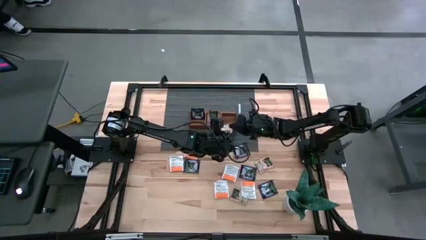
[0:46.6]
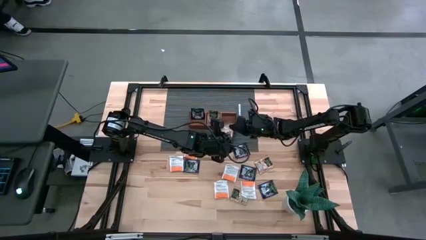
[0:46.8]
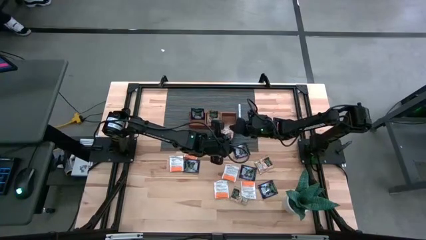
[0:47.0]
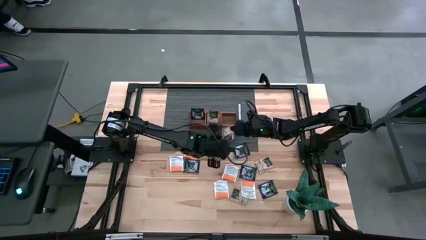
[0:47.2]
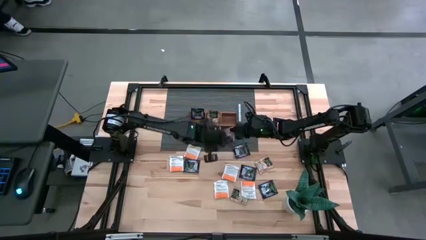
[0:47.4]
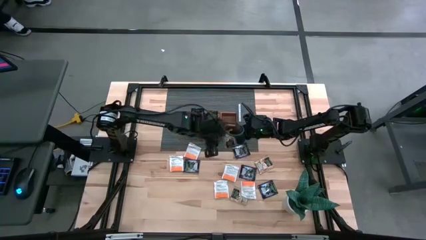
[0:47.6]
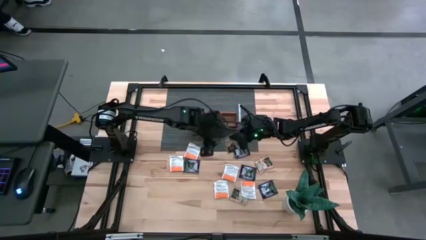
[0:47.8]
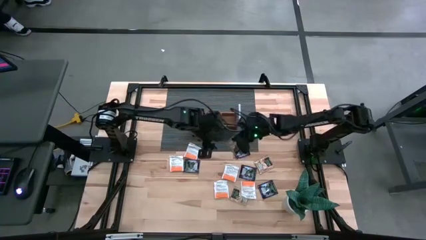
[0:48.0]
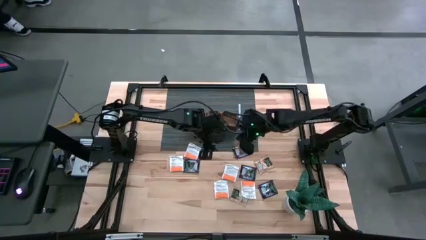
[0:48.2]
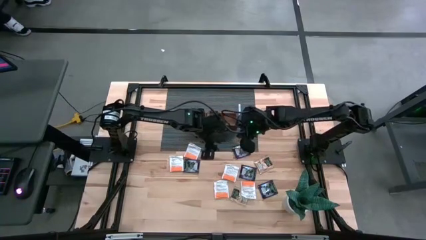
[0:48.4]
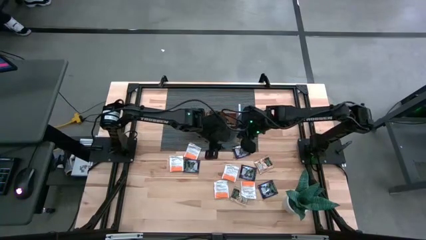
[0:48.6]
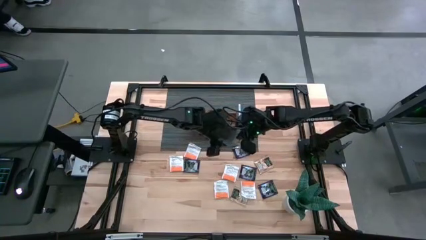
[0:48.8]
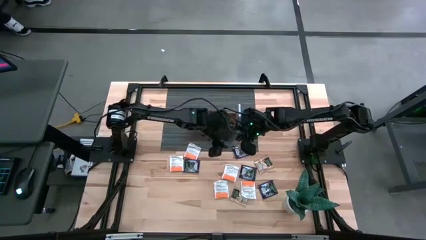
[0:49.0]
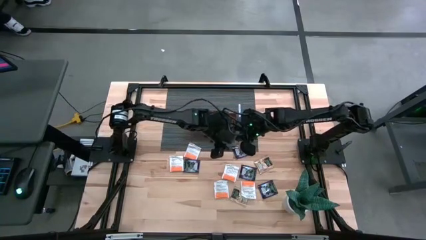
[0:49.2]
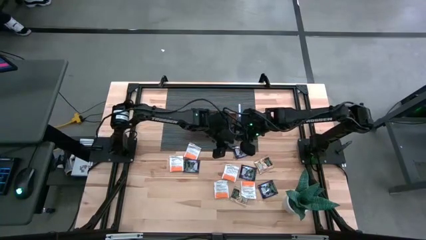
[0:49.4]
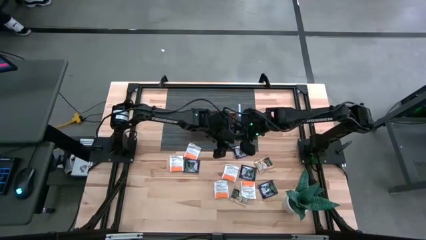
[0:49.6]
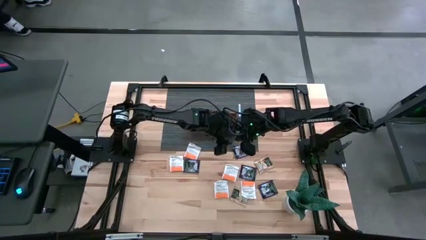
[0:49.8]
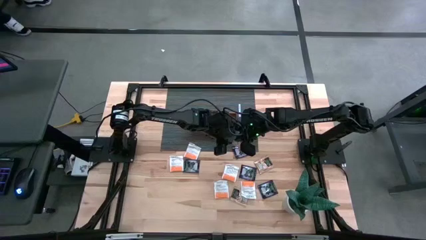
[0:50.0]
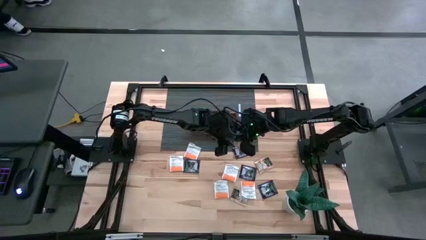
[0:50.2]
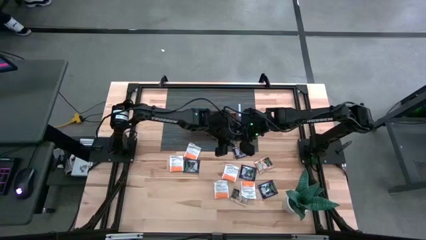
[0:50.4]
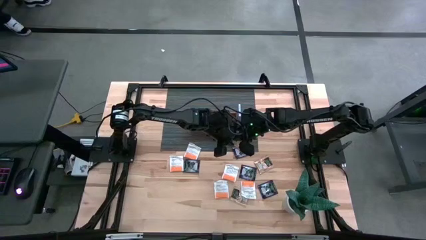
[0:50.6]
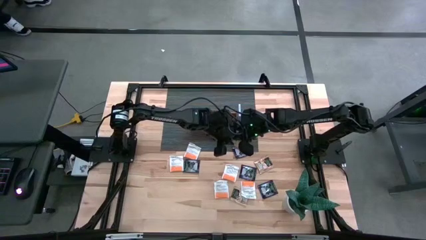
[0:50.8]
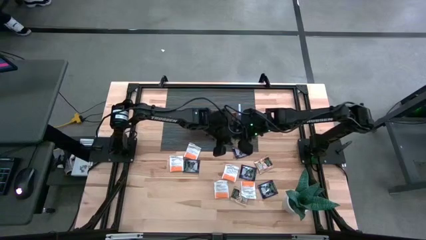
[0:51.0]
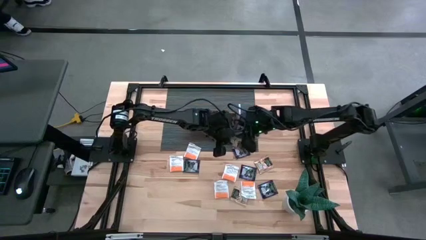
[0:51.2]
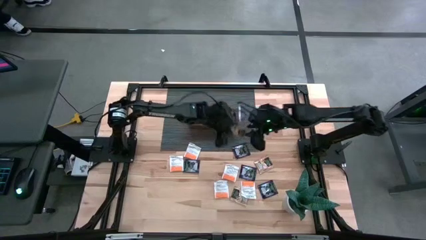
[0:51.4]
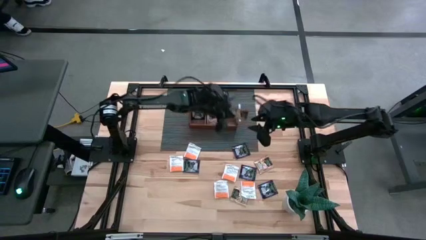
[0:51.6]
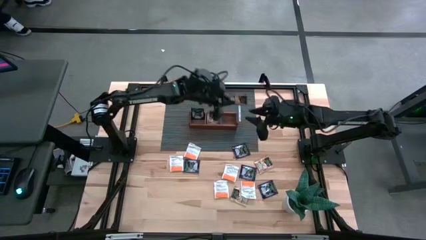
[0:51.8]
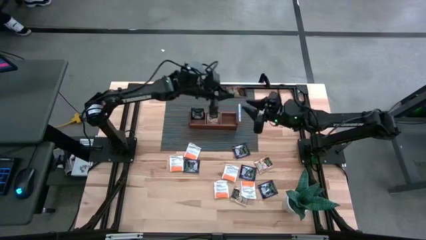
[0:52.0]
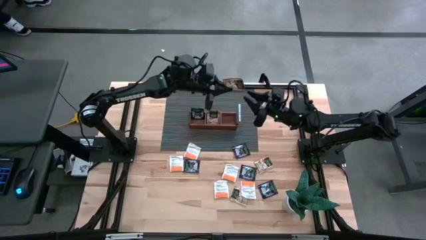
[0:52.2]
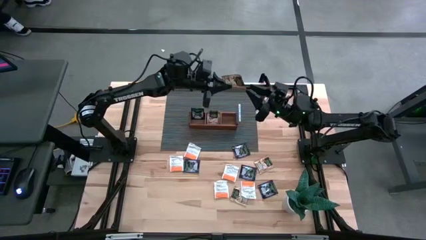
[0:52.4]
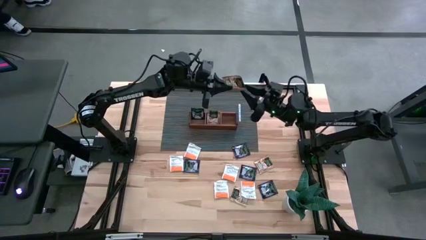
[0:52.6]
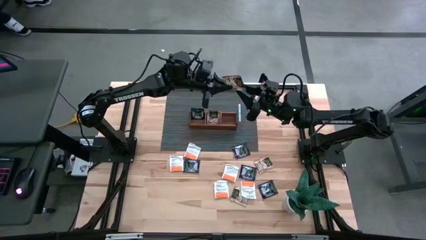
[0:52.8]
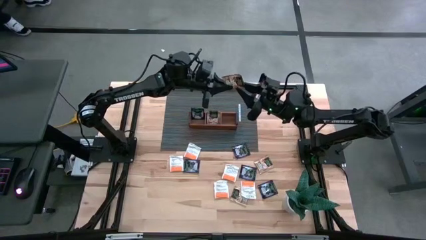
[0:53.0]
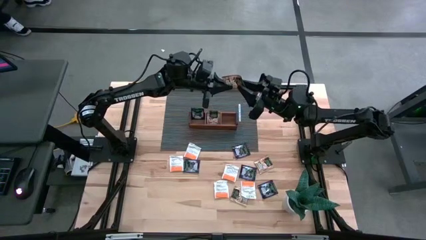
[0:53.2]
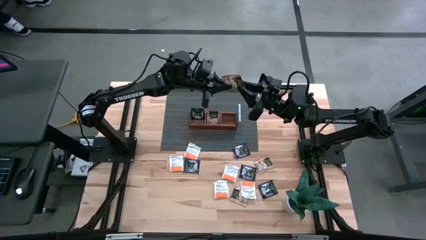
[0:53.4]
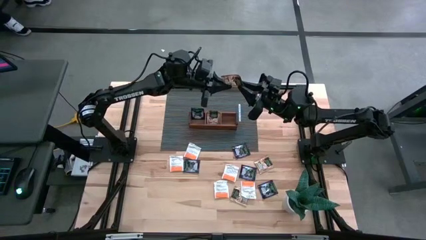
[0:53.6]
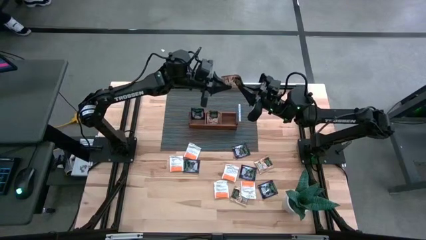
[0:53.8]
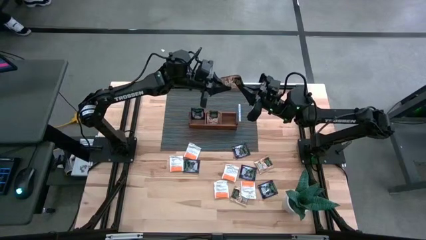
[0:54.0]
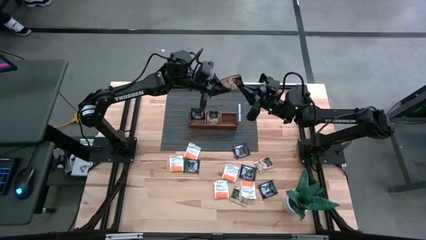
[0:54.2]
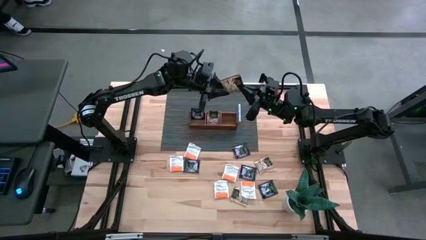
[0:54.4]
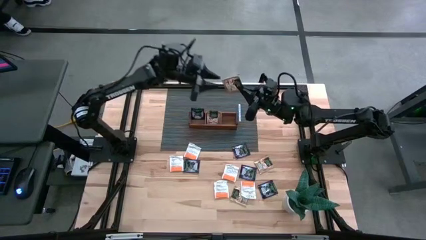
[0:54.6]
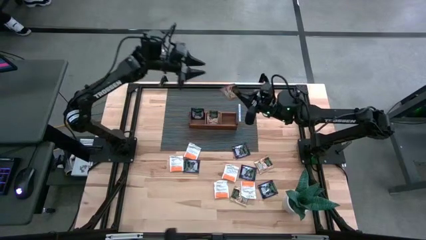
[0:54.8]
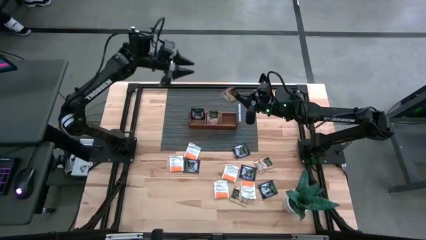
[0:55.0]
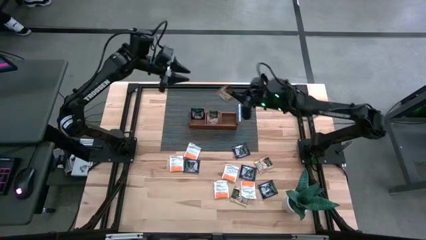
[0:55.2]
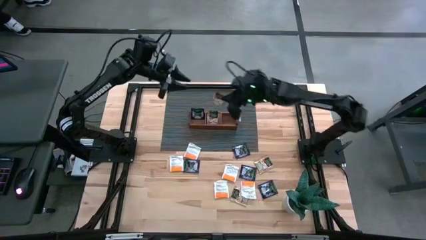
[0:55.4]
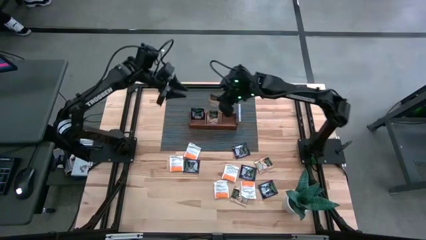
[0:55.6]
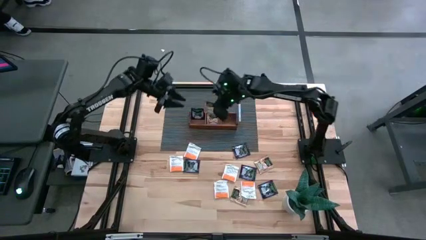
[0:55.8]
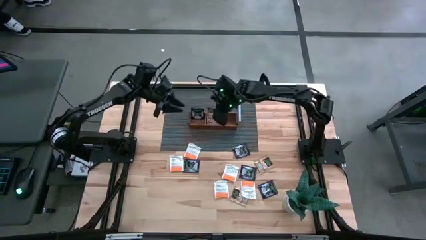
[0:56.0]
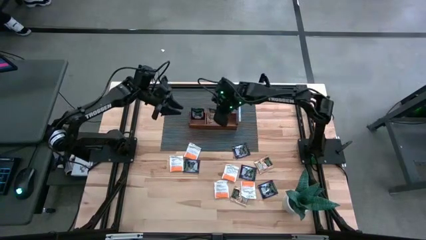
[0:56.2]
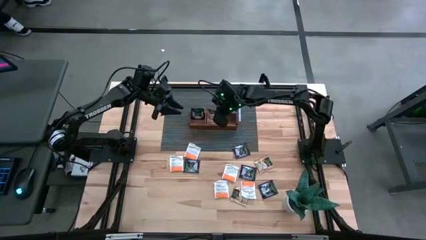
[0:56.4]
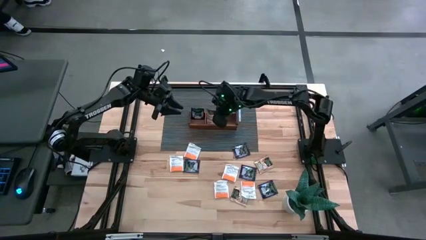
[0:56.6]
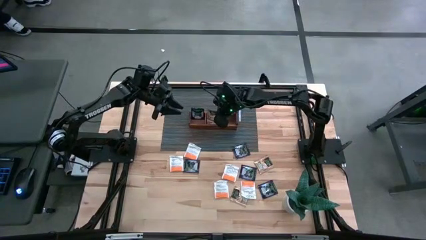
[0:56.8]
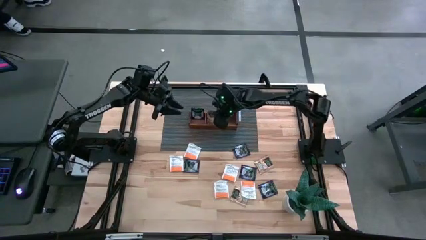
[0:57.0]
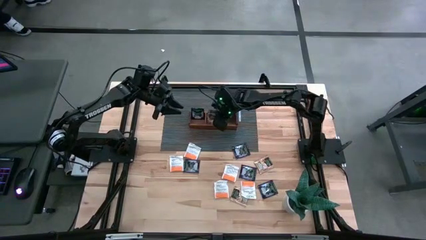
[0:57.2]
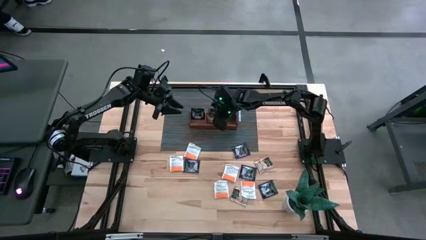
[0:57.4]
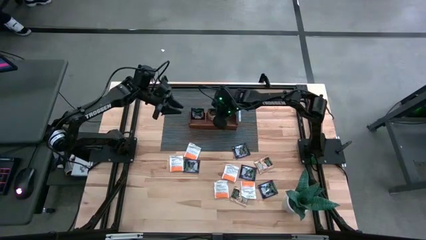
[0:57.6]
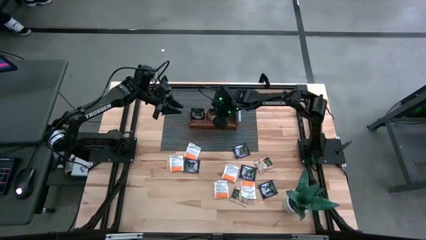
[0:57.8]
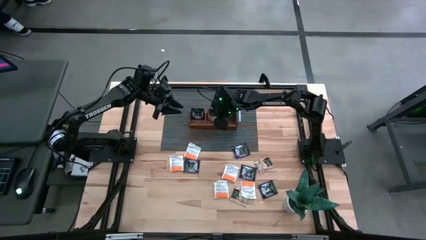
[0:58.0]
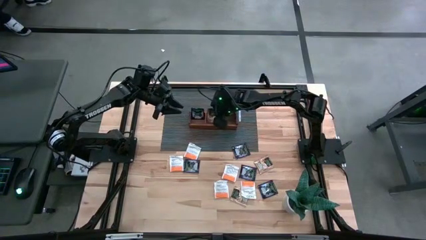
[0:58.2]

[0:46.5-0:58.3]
Task: Pick & Place Tea
Put the brown tea bag into the middle section of the wooden organizer

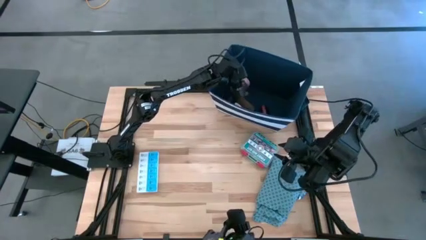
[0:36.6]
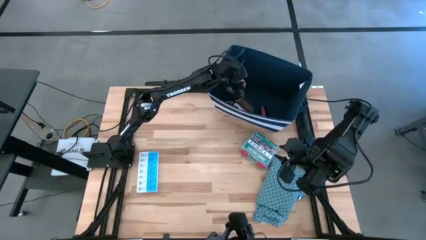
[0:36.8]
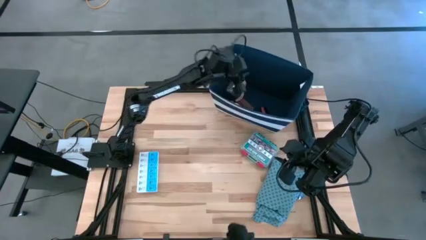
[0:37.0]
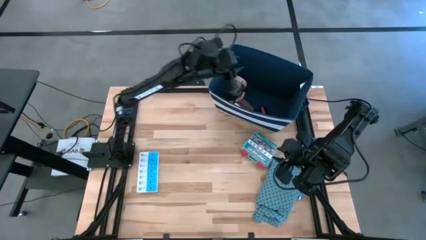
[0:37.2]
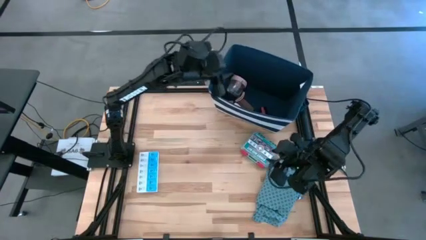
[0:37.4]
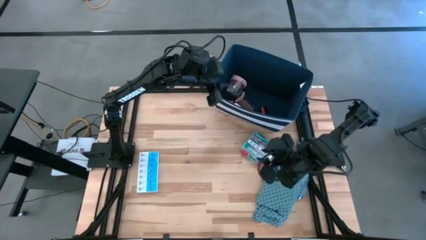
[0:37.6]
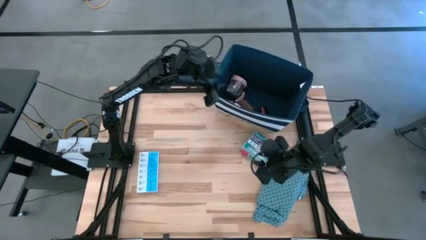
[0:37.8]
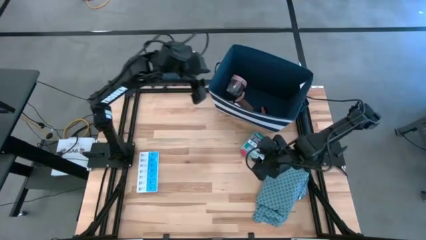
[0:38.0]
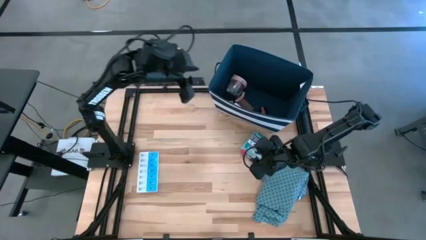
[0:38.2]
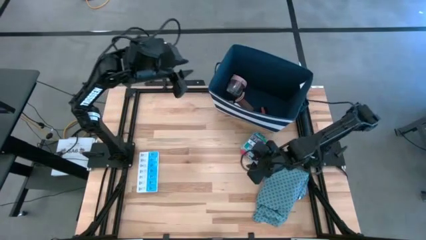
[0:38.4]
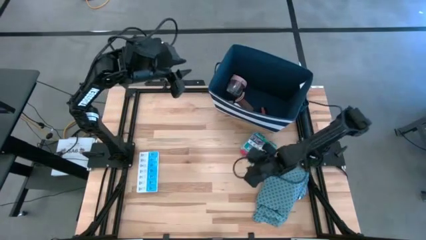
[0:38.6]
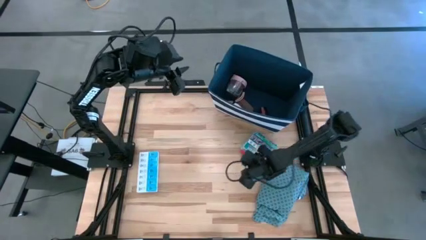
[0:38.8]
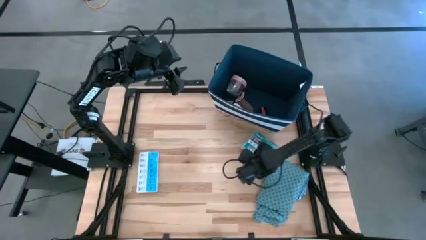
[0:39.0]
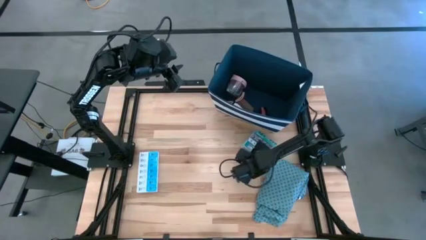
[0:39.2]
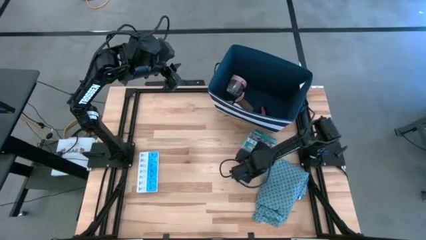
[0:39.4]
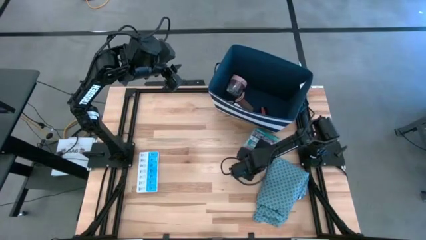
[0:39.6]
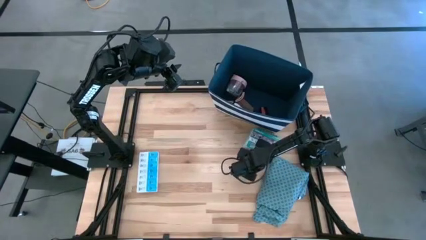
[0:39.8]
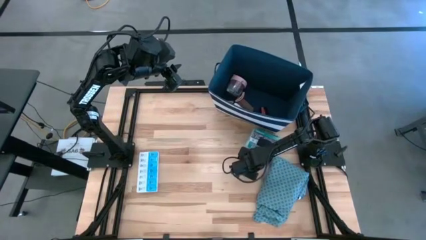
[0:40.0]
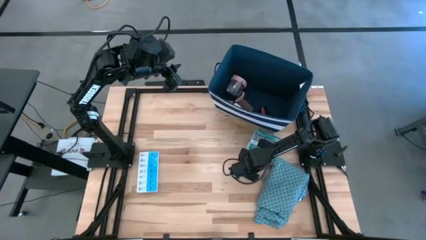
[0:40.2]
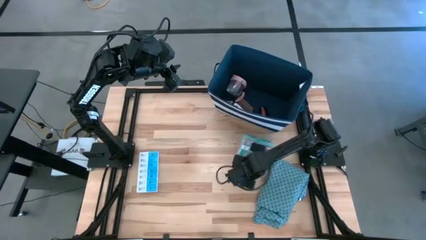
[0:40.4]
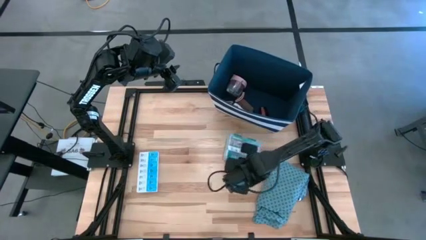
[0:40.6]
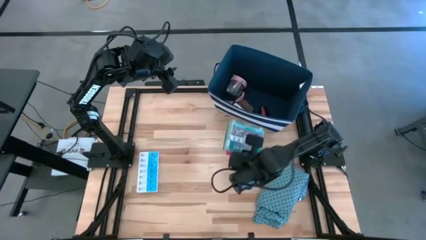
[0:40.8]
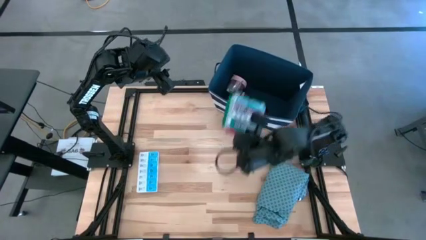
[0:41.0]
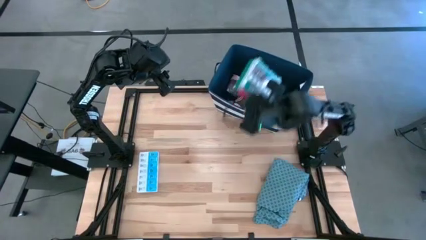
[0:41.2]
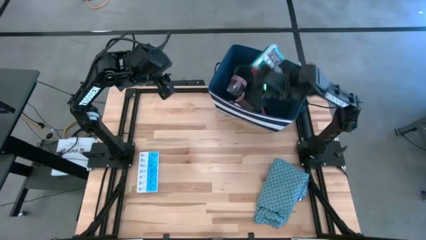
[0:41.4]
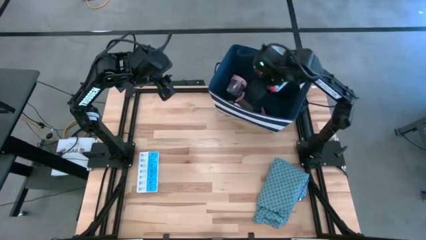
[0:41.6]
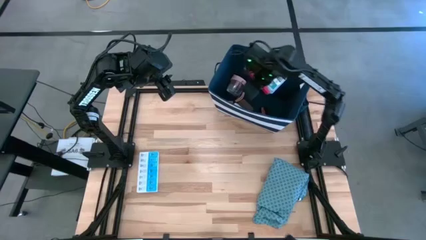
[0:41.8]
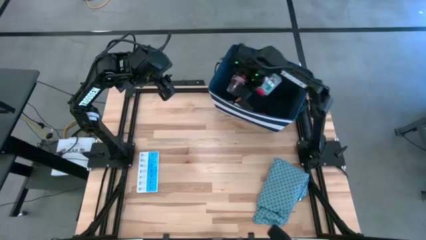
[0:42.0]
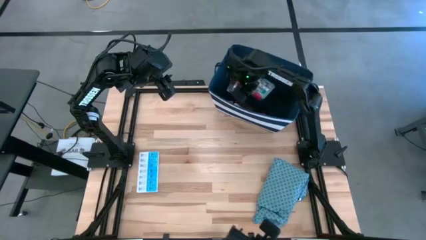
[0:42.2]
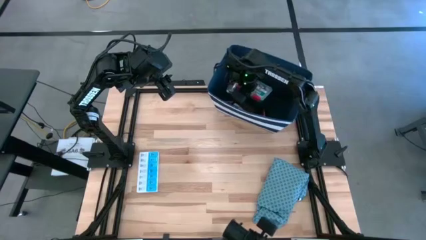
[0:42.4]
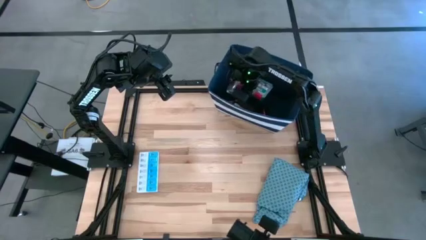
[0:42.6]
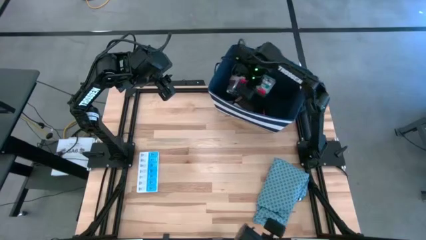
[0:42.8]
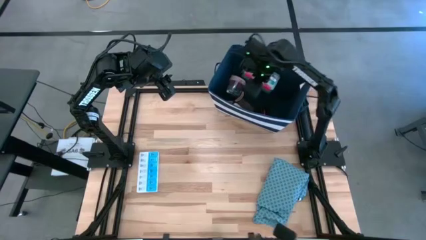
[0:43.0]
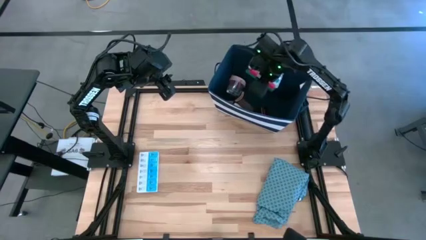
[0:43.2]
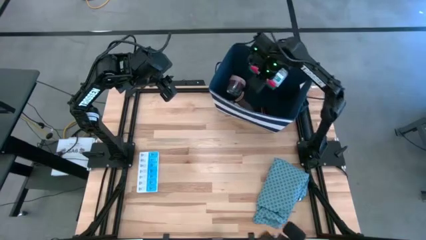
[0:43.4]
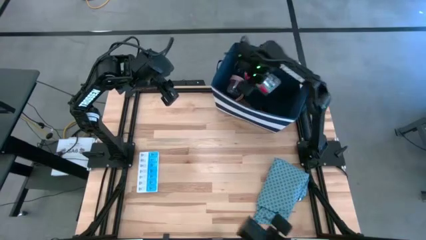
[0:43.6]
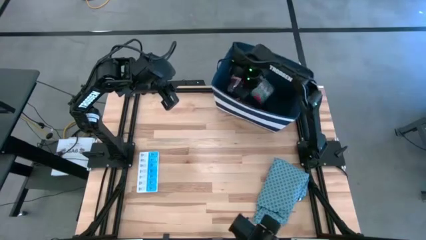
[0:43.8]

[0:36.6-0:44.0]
Task: Pick & place medical supplies in basket/bin
Put the first aid kit into the white bin
